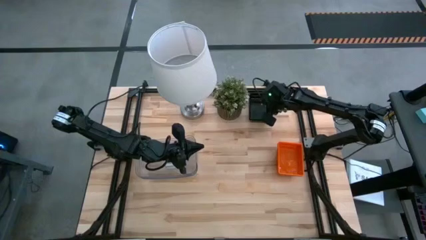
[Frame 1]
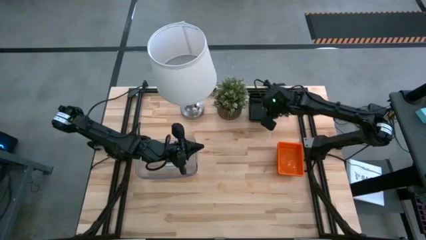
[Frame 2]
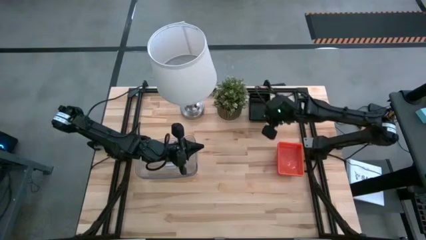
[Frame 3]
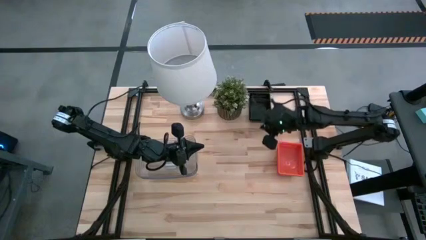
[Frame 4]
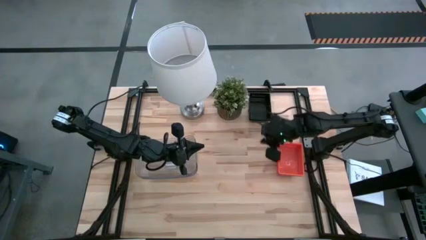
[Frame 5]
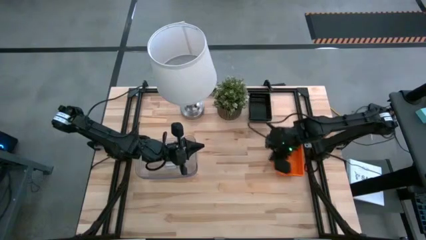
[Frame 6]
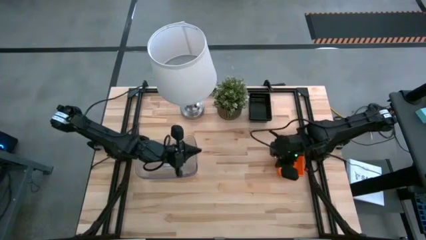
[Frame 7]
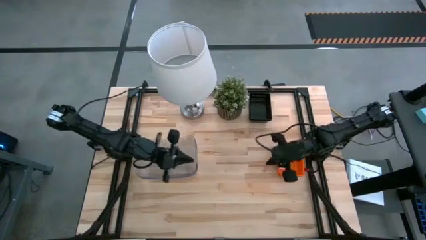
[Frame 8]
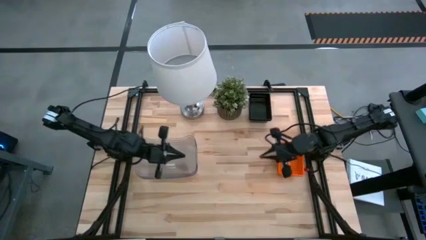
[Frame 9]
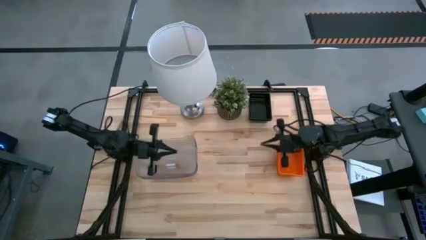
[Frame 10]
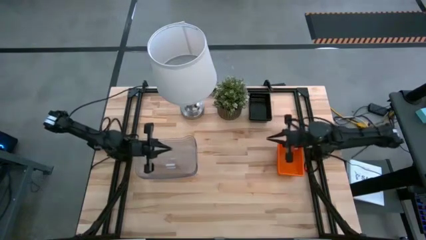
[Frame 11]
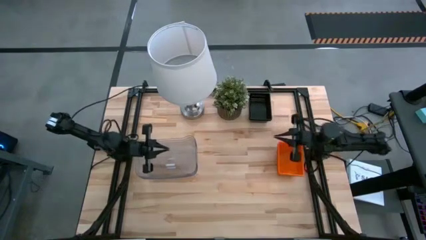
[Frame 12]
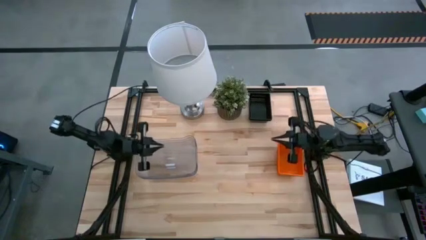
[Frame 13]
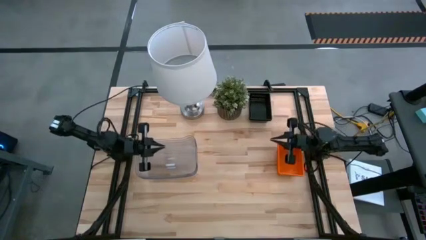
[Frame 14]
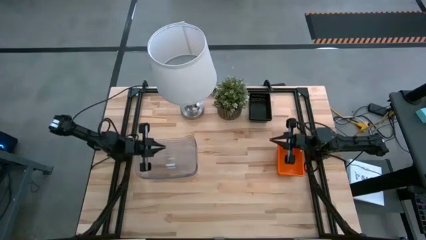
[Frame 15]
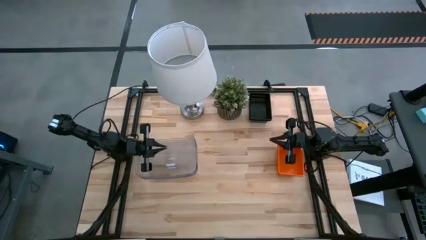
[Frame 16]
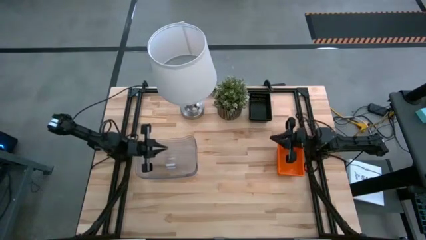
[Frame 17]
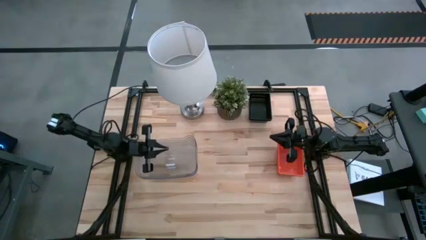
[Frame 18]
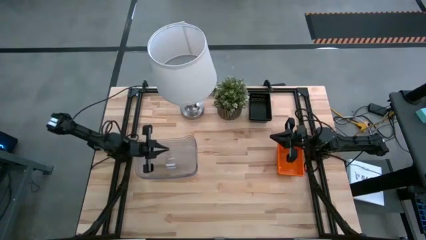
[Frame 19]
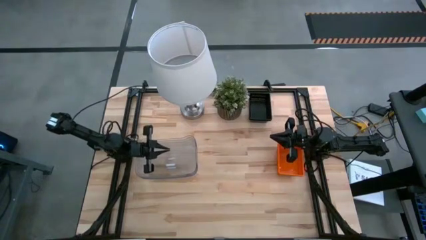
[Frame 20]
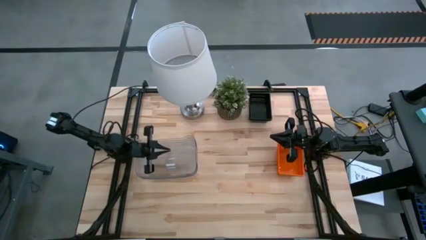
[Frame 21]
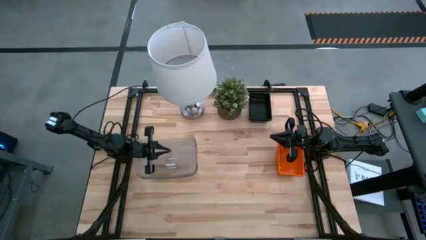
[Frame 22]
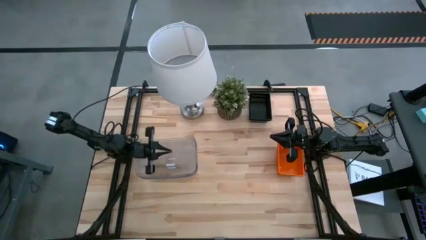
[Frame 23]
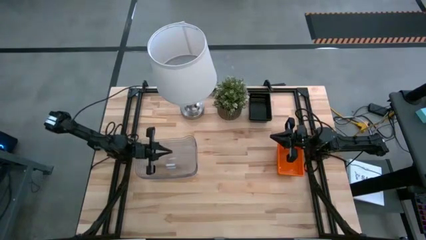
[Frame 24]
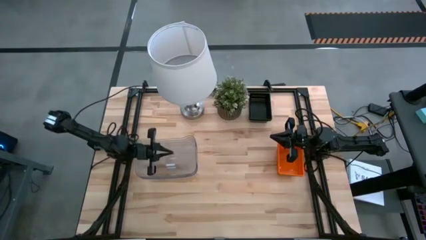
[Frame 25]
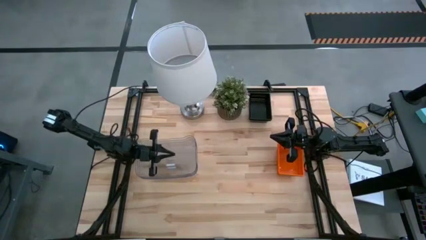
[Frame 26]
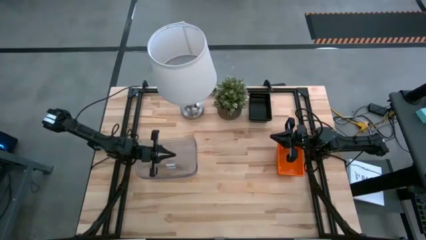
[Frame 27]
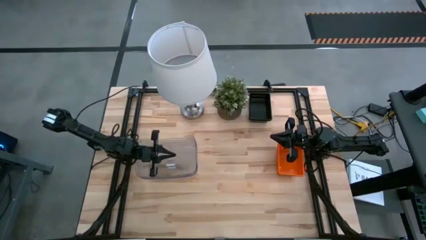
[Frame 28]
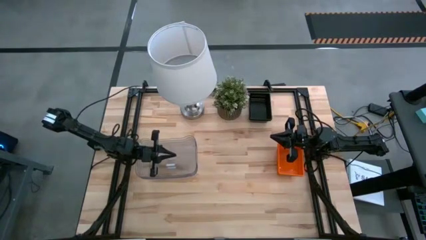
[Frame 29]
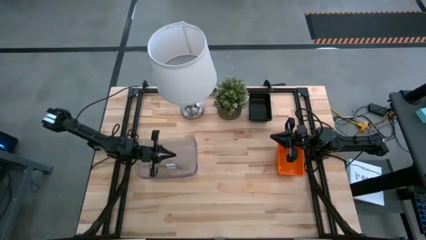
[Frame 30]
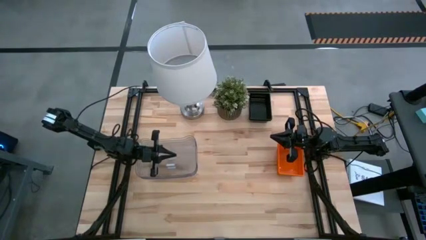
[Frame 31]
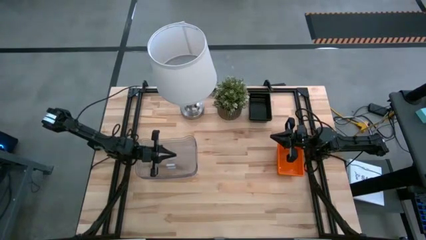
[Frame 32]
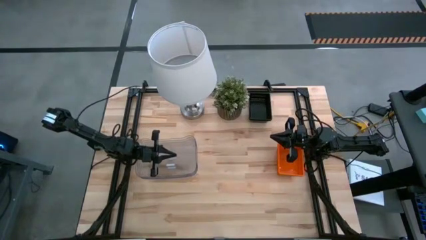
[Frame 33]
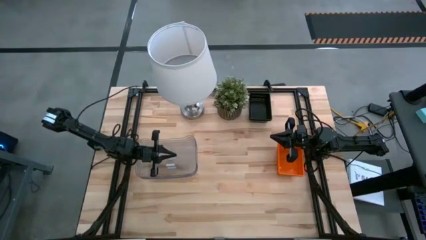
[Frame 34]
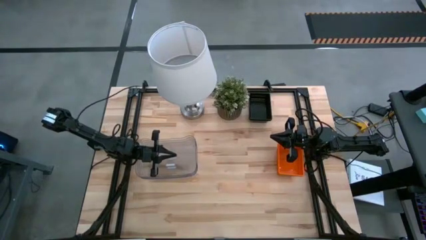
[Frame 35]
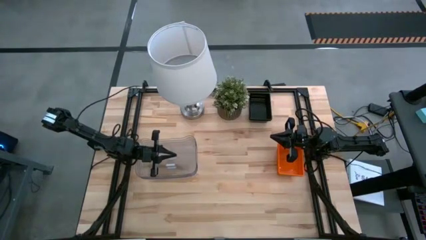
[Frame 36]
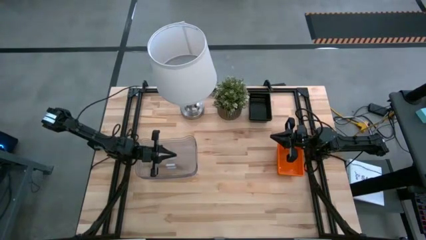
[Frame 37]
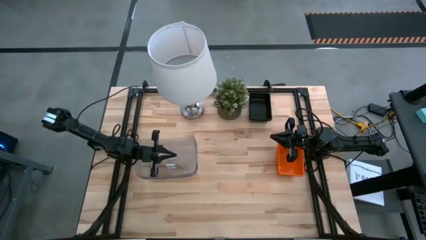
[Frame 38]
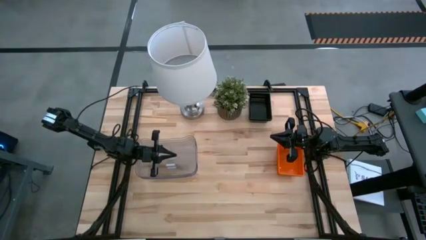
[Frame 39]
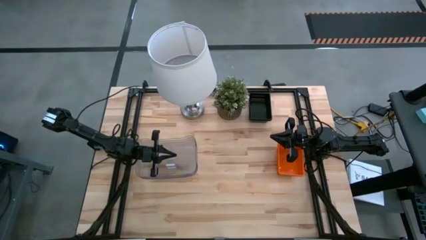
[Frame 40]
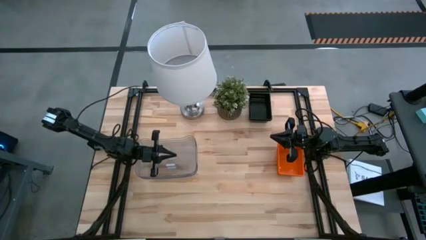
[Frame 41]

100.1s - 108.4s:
Return to Home Position

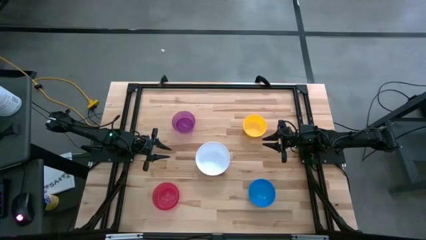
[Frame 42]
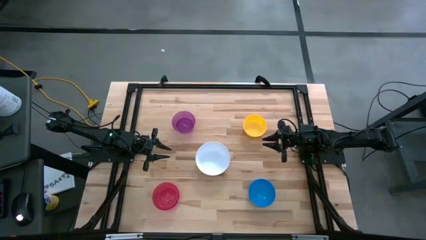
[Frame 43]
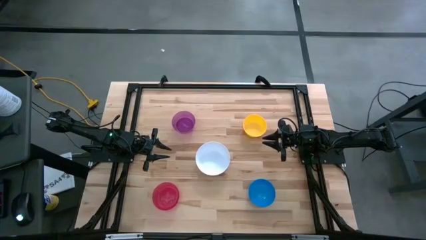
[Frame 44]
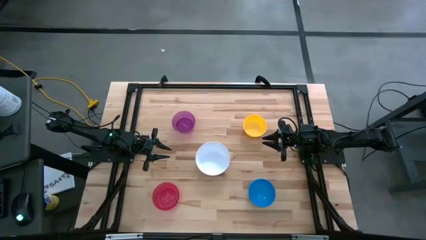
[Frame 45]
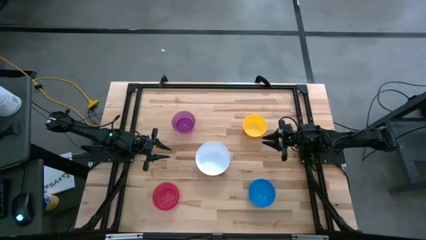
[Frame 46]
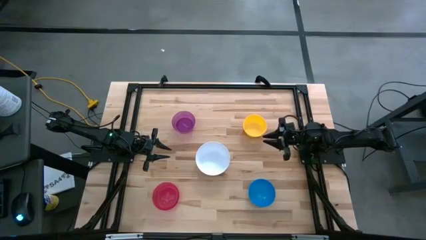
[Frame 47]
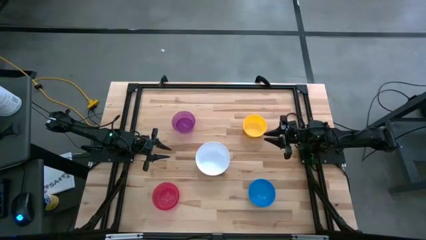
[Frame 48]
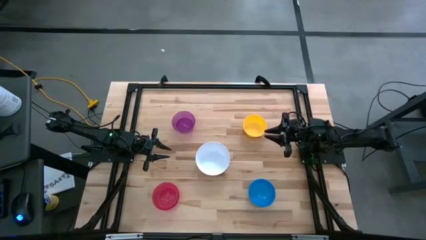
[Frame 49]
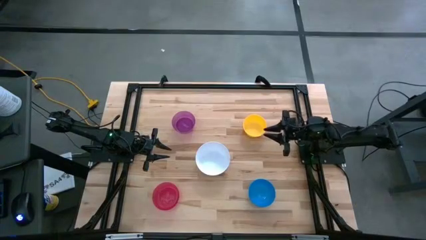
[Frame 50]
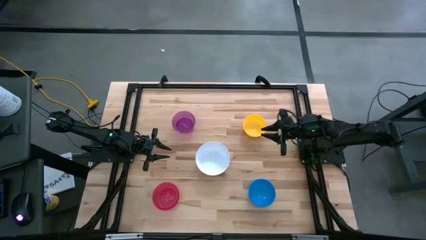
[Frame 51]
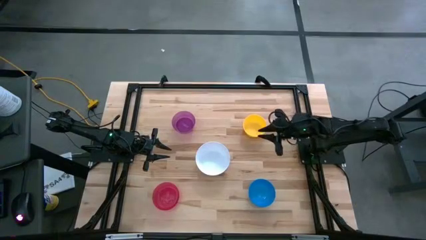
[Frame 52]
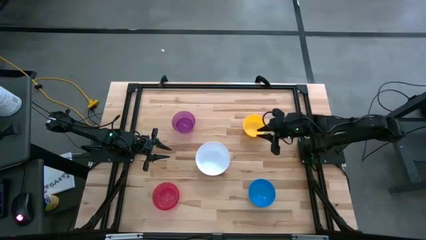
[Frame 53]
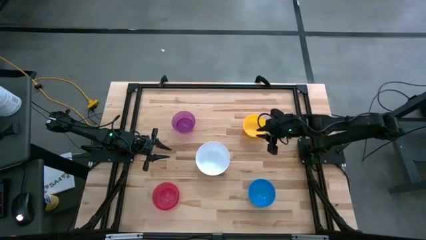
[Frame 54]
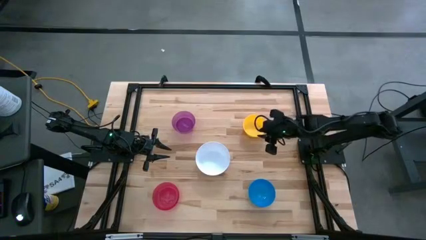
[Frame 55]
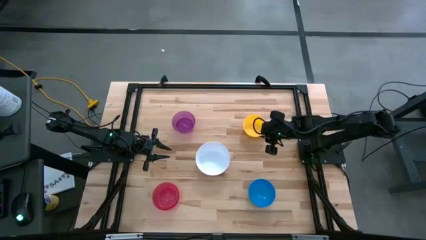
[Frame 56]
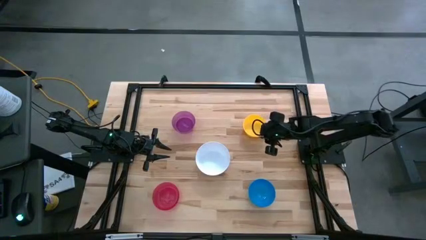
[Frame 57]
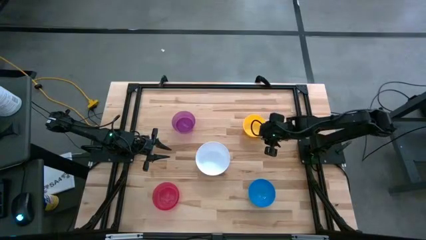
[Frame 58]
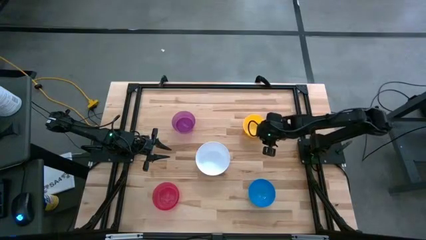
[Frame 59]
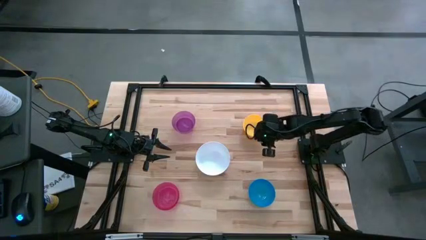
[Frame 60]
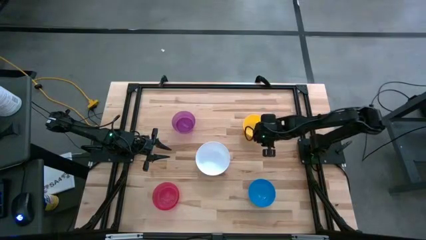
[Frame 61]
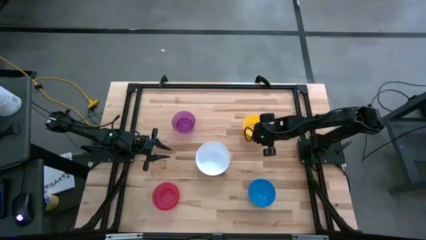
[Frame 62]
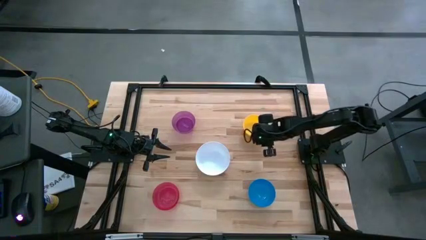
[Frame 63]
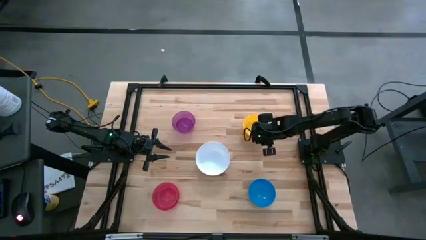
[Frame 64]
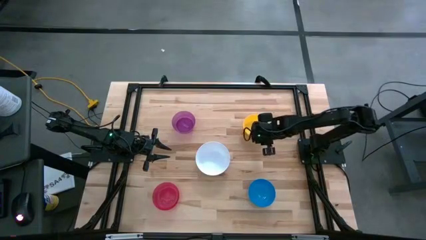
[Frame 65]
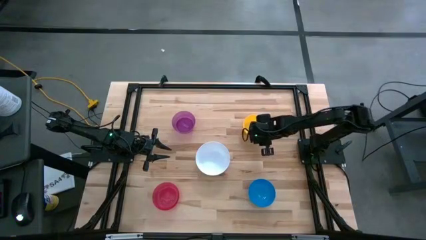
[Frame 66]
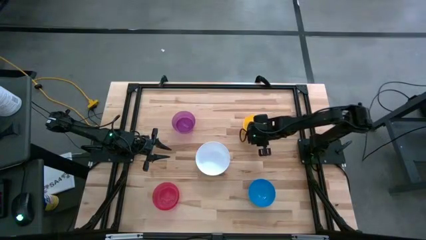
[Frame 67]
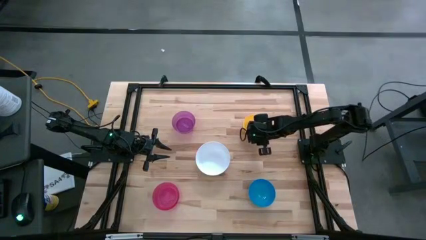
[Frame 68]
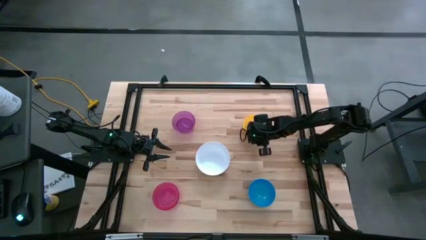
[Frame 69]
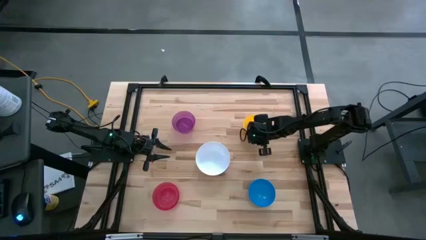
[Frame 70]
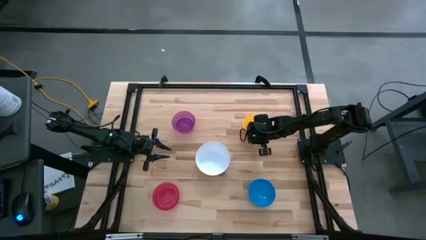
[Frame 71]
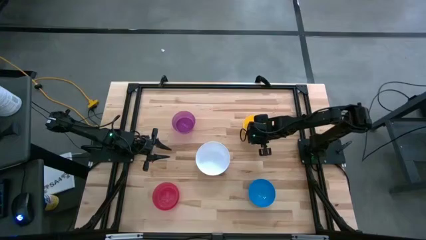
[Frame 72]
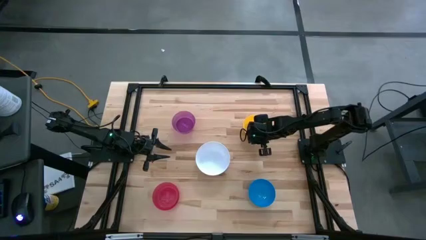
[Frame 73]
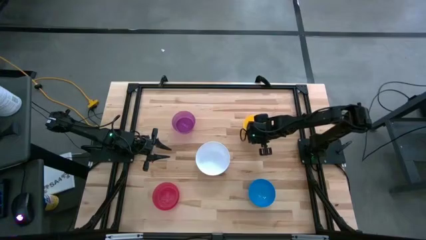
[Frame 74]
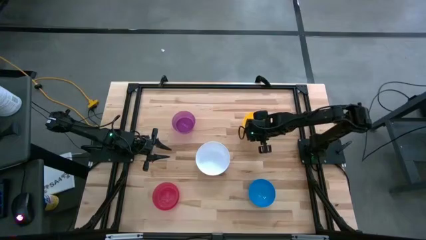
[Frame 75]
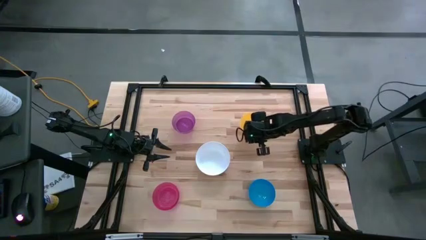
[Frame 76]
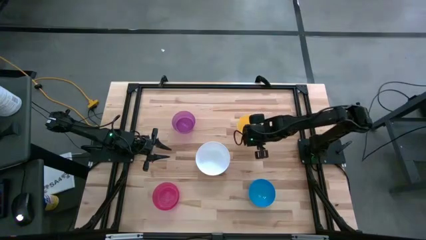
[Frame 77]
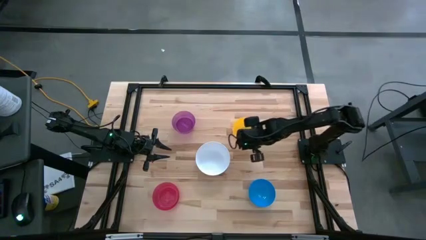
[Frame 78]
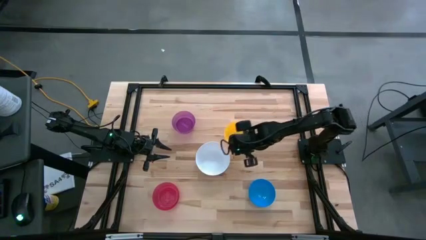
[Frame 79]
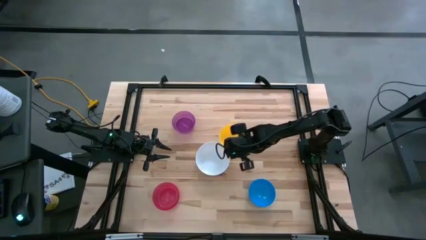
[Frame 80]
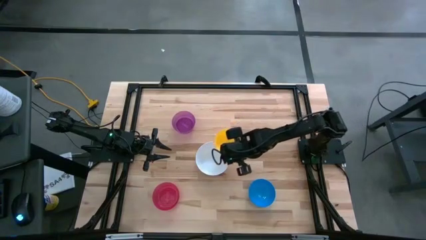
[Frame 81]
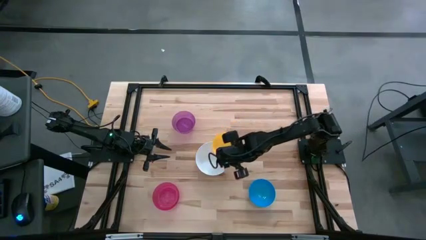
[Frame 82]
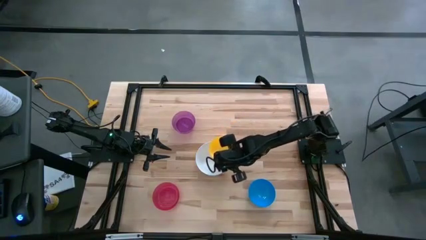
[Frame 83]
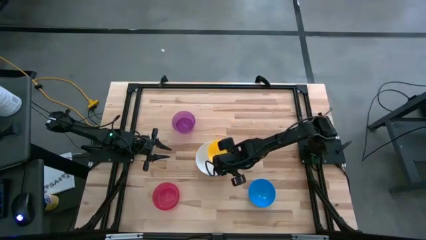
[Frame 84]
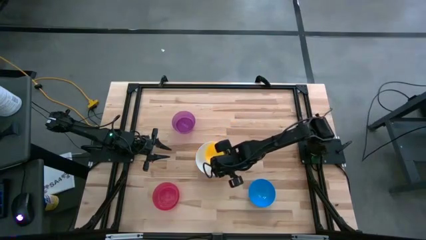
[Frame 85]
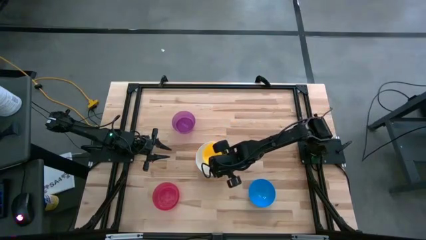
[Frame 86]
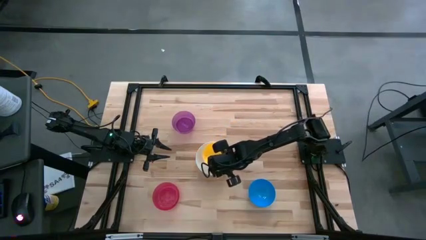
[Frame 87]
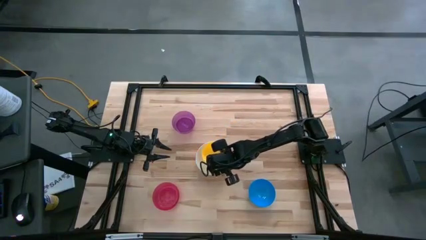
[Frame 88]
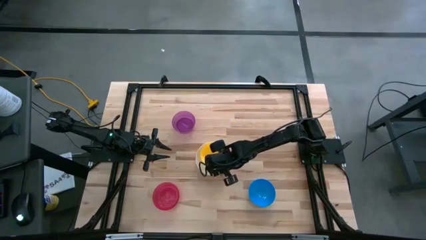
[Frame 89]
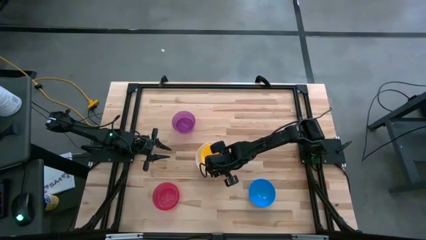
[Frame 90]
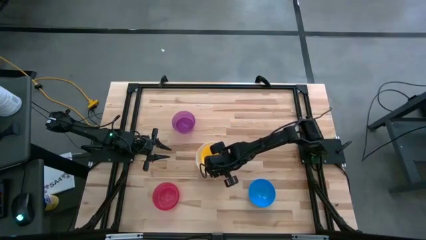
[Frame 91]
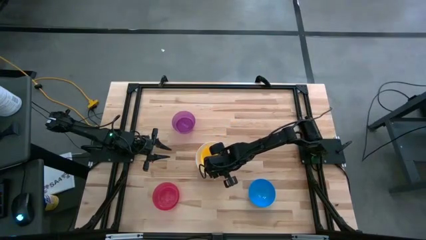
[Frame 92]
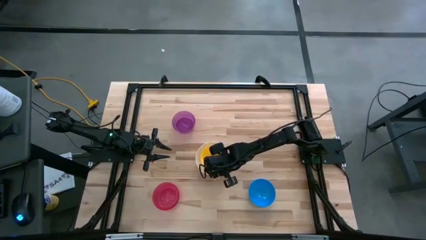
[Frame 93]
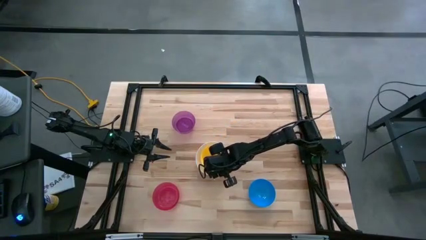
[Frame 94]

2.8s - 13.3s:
Stack the yellow bowl on the white bowl
